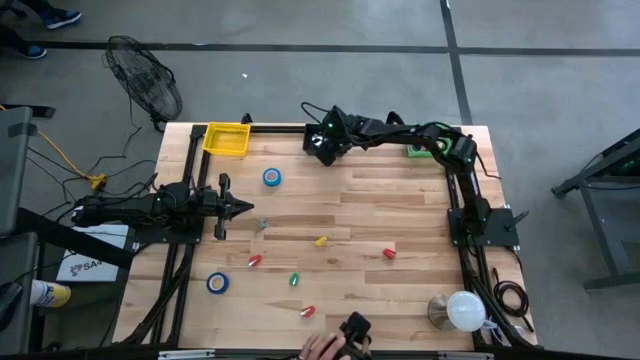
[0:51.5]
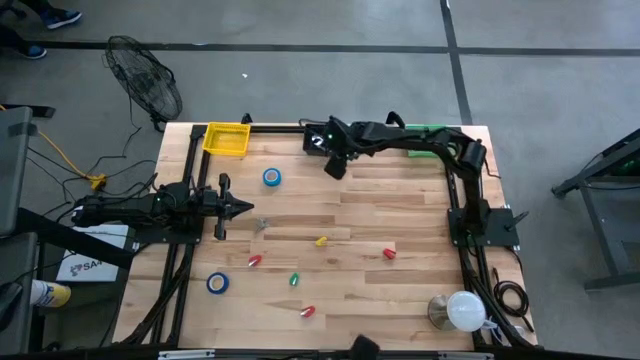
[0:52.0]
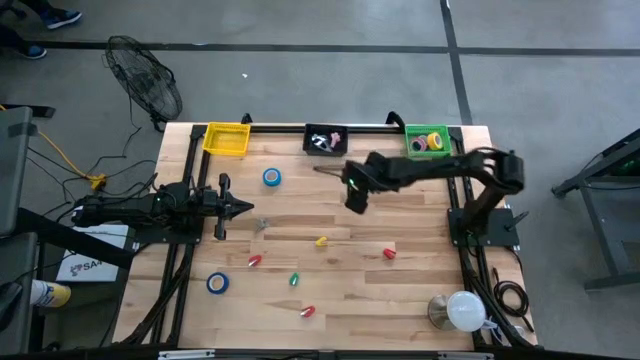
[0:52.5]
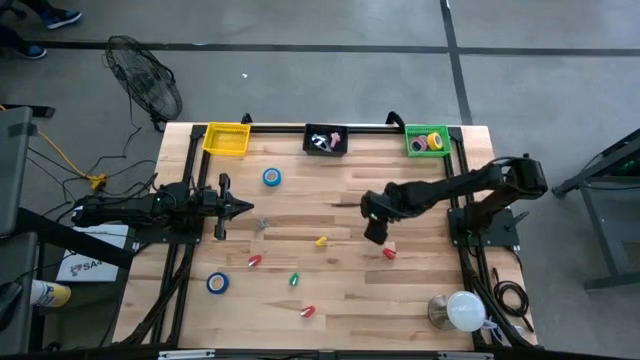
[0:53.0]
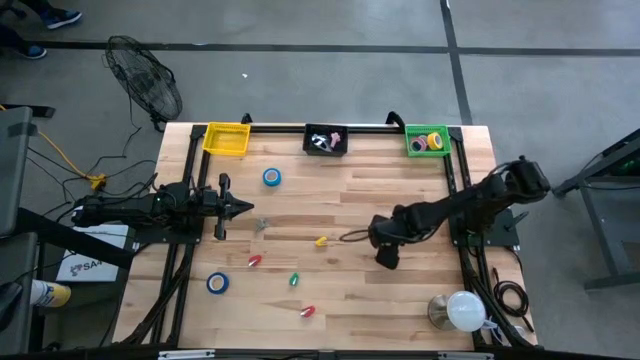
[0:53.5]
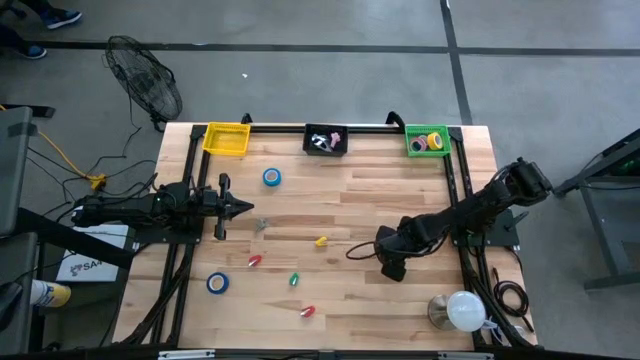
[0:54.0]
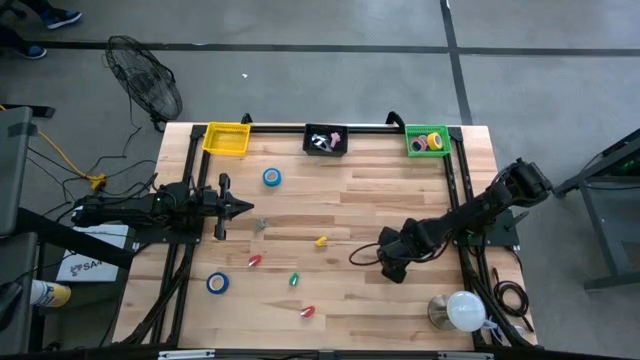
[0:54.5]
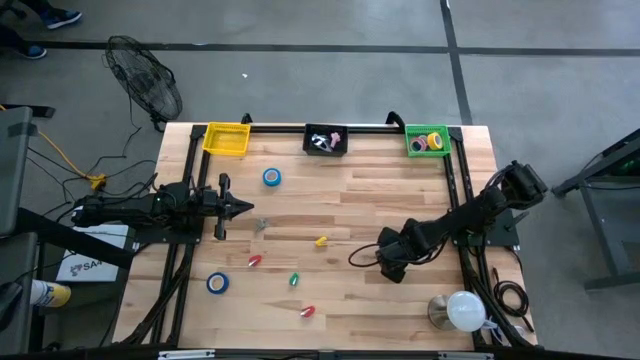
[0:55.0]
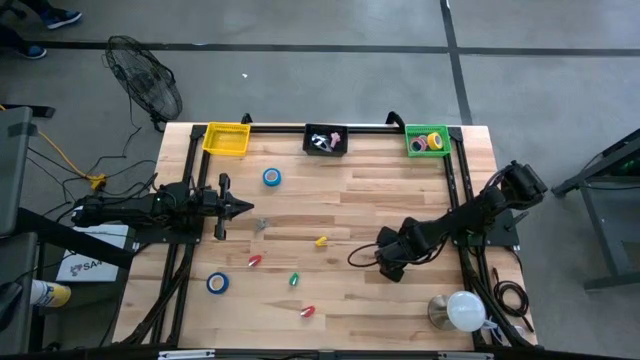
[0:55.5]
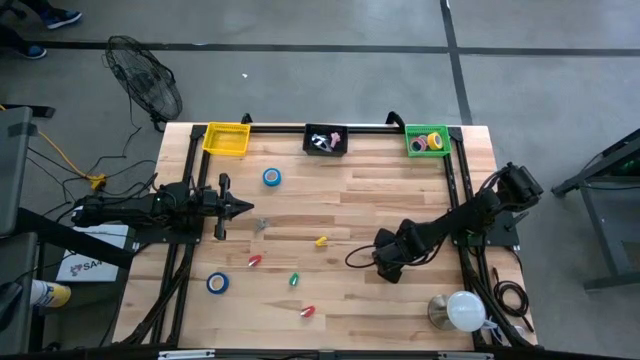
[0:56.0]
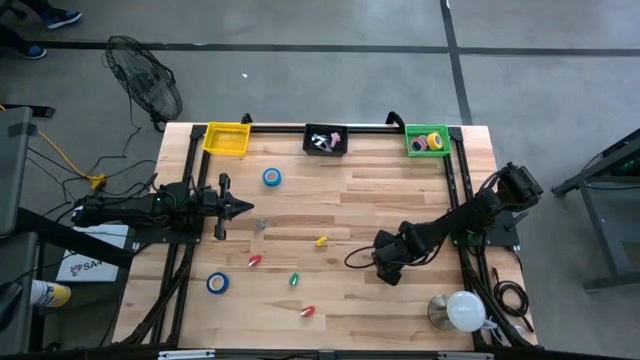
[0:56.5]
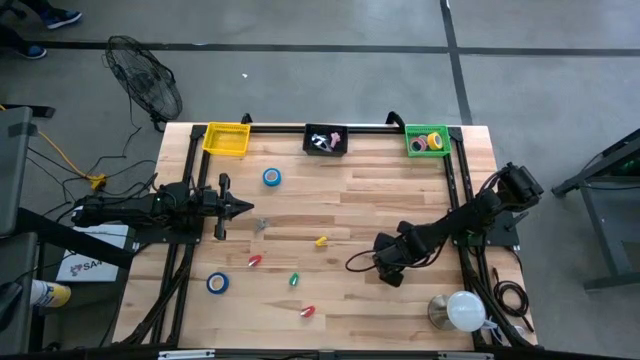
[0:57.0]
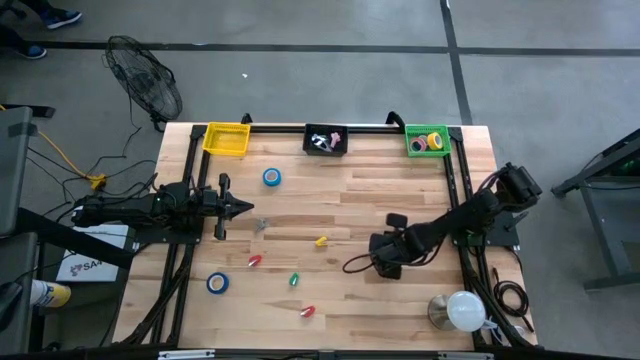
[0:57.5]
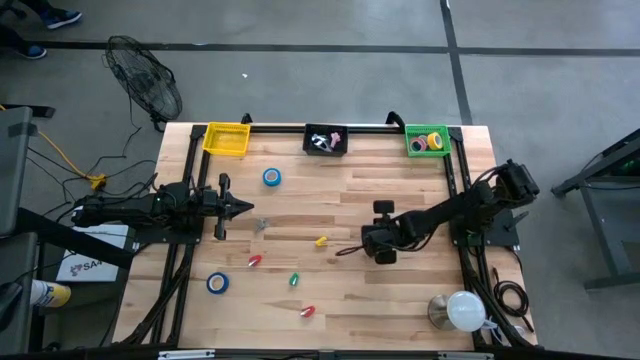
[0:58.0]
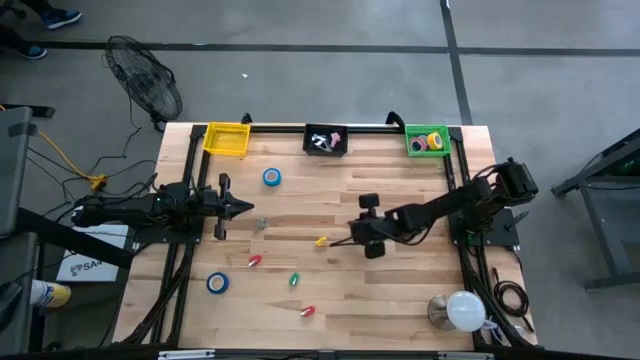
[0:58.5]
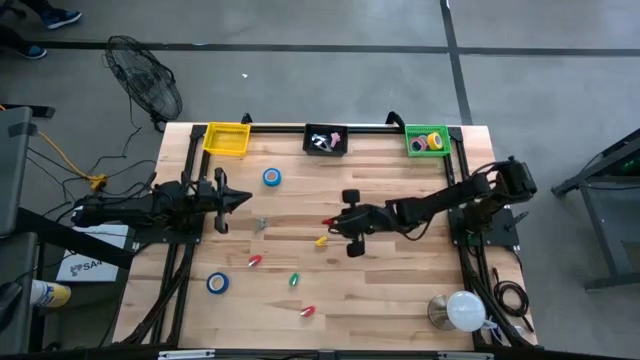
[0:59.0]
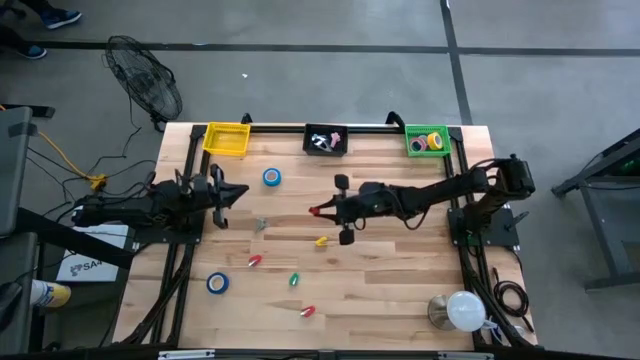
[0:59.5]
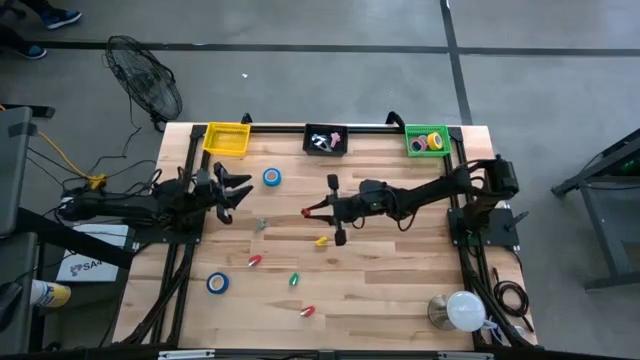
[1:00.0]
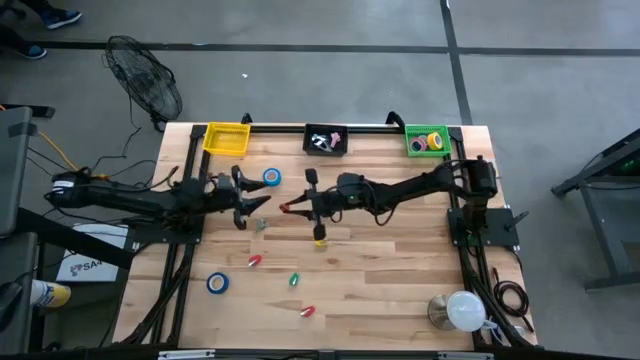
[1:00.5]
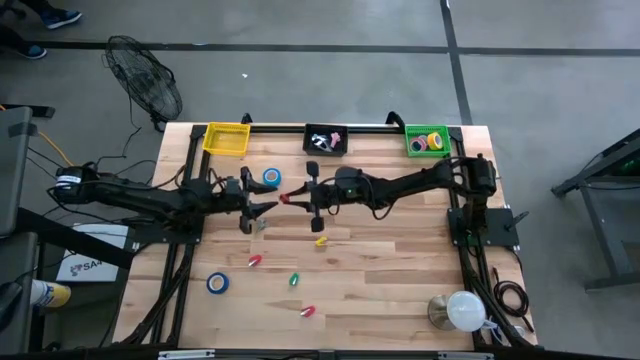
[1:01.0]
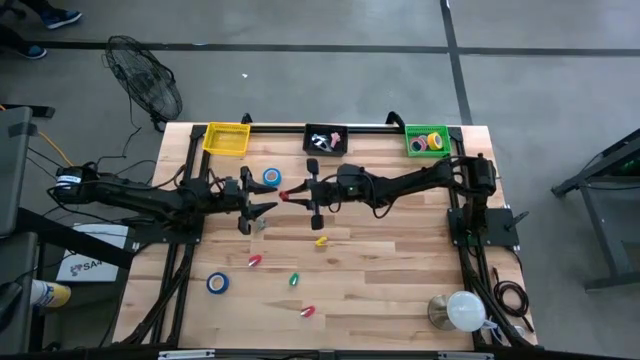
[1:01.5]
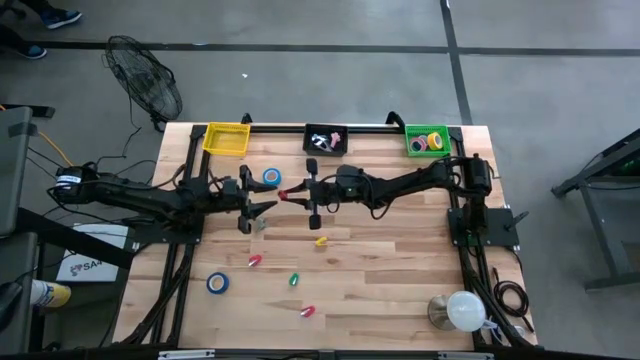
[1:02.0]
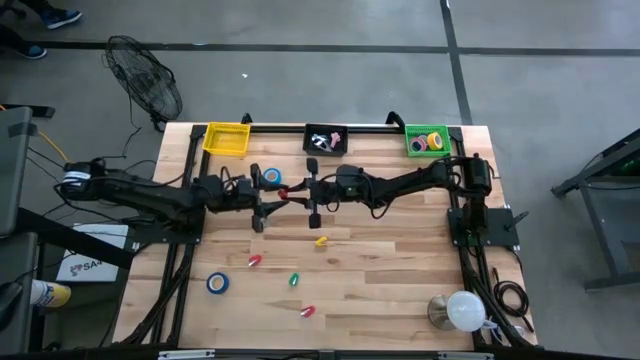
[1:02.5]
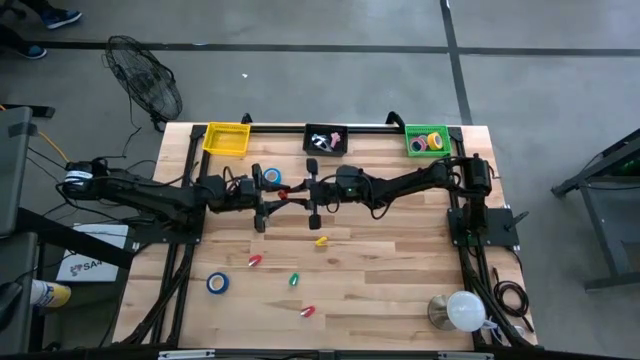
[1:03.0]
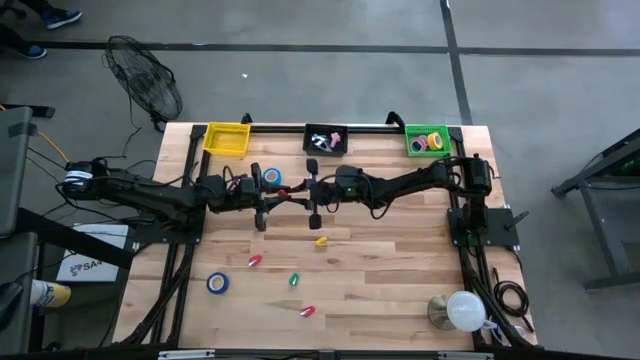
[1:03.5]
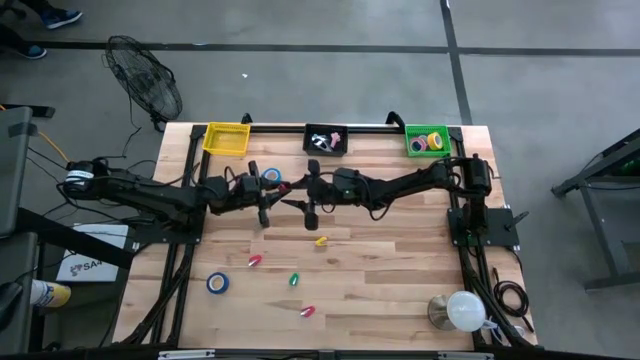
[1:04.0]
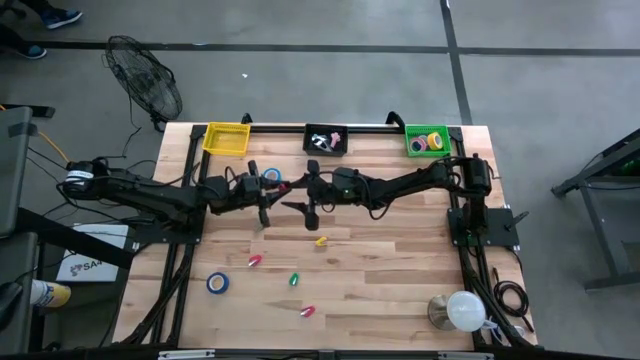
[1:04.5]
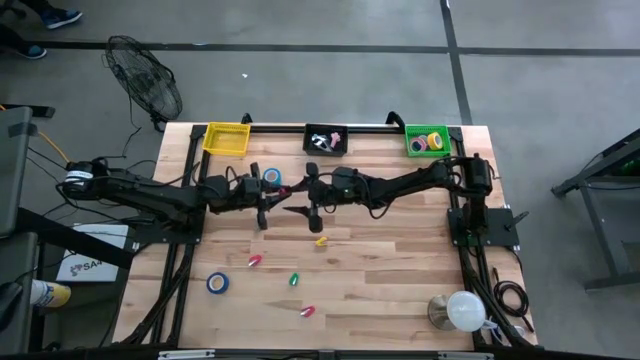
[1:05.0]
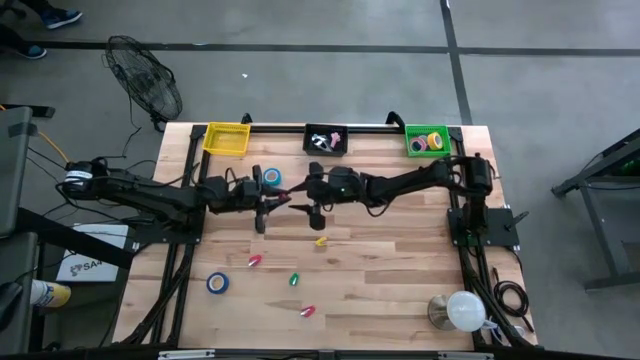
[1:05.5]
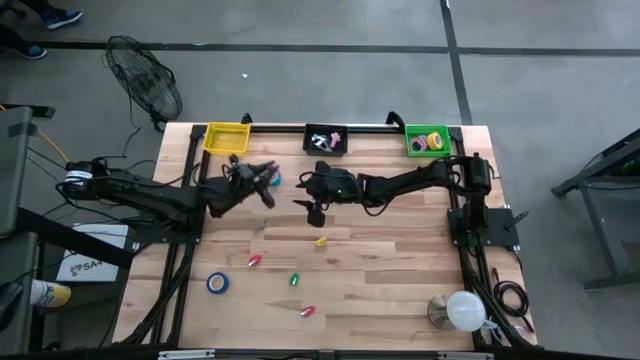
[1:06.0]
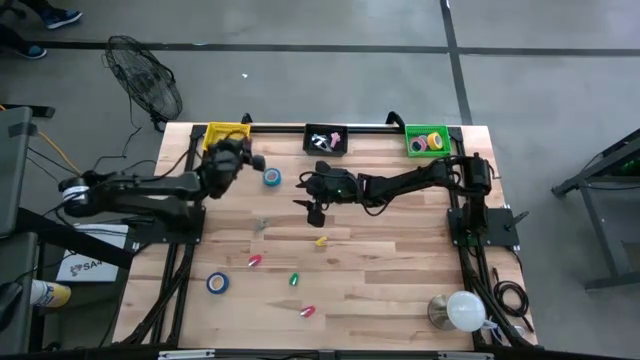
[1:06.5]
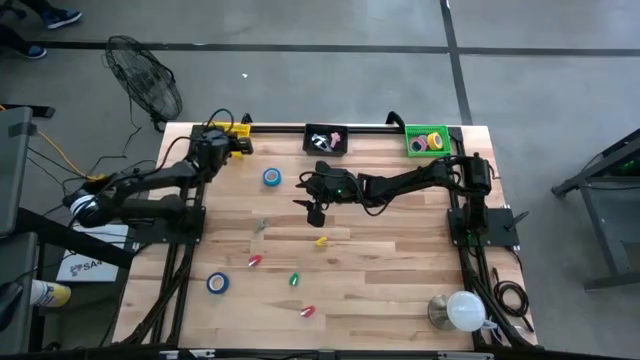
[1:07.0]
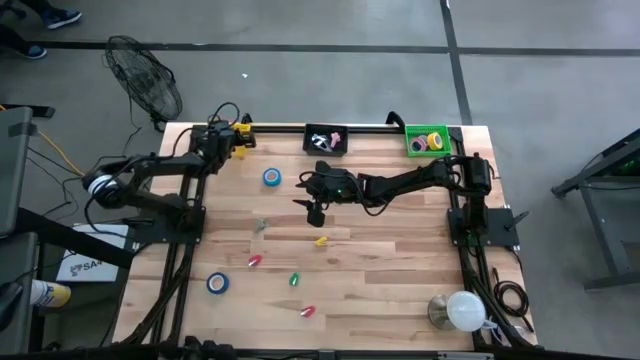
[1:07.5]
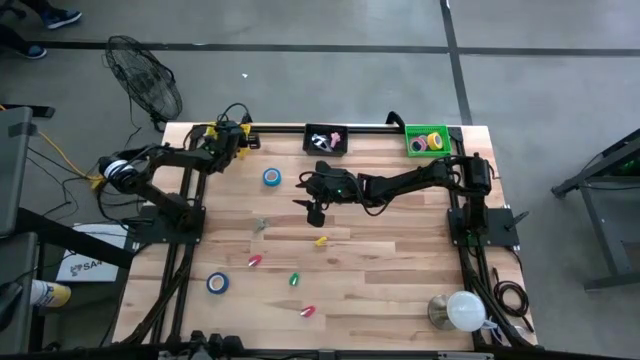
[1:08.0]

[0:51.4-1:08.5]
Task: Pick and place Stapler, Stapler remover, tape
Put the top right red stapler into the yellow bin

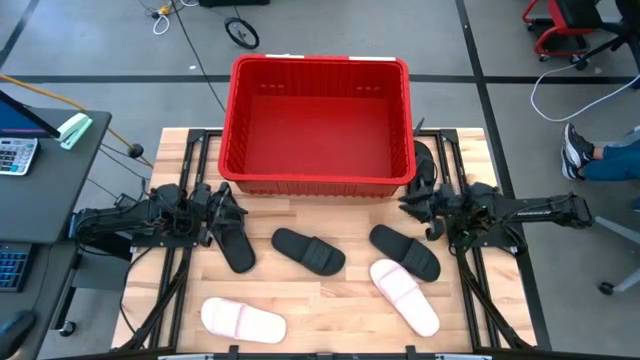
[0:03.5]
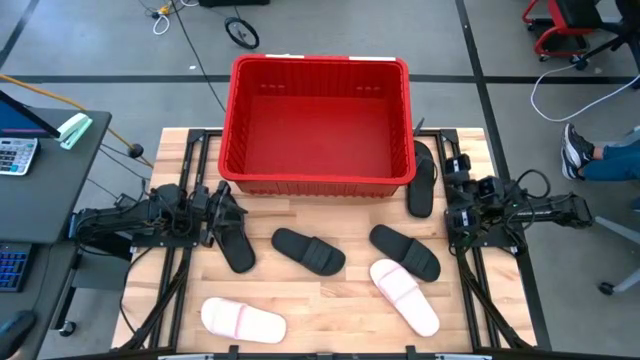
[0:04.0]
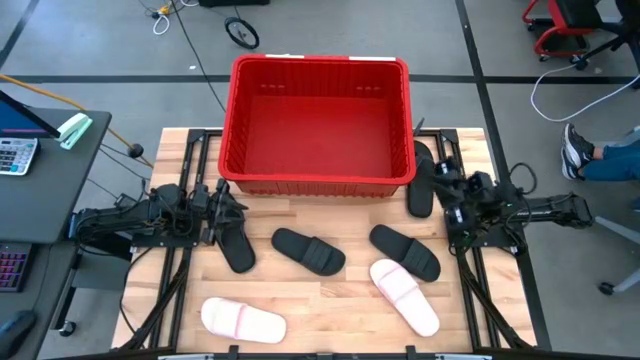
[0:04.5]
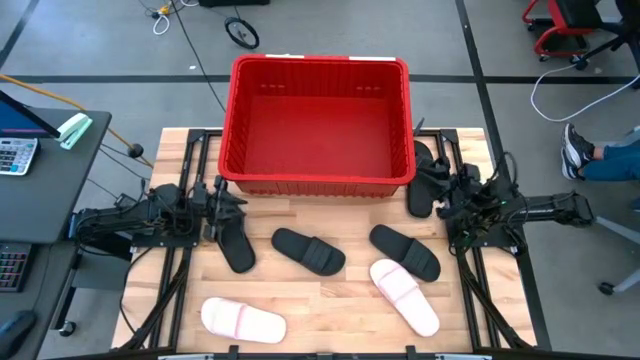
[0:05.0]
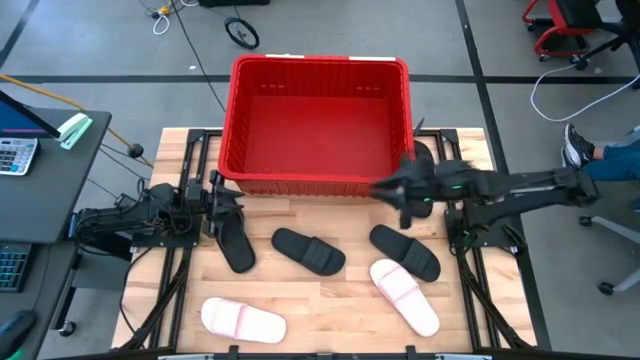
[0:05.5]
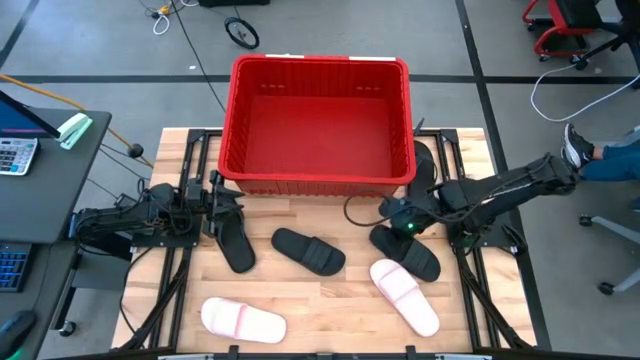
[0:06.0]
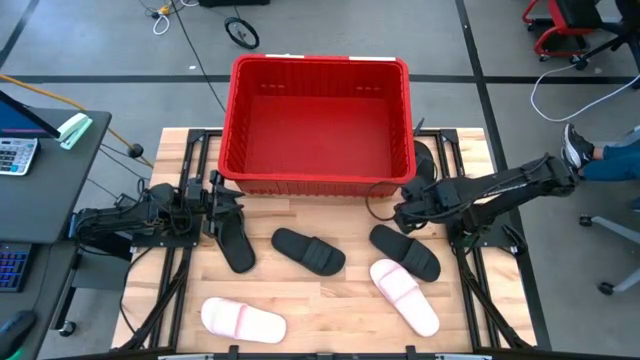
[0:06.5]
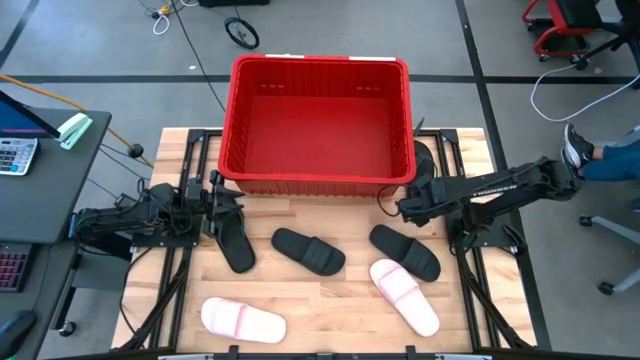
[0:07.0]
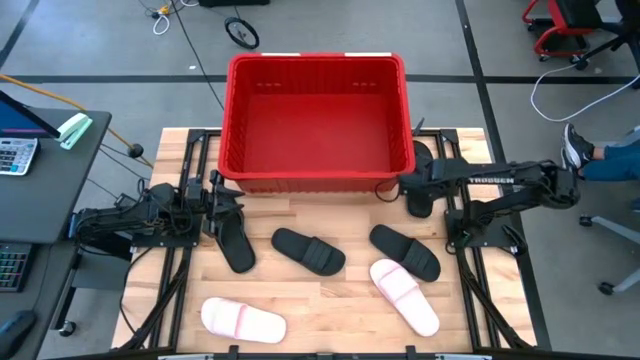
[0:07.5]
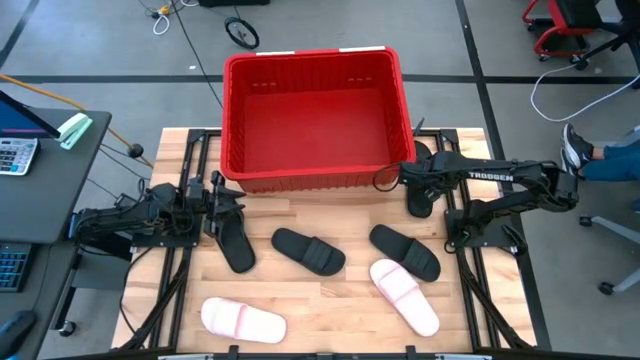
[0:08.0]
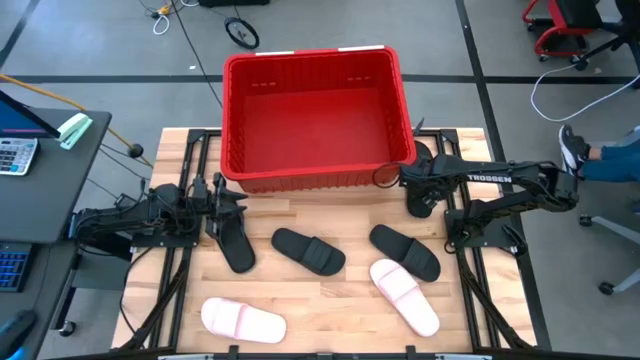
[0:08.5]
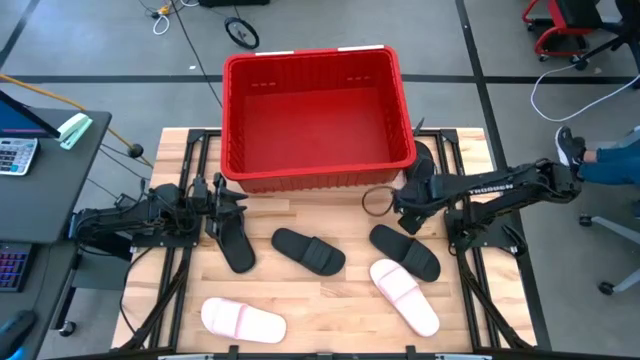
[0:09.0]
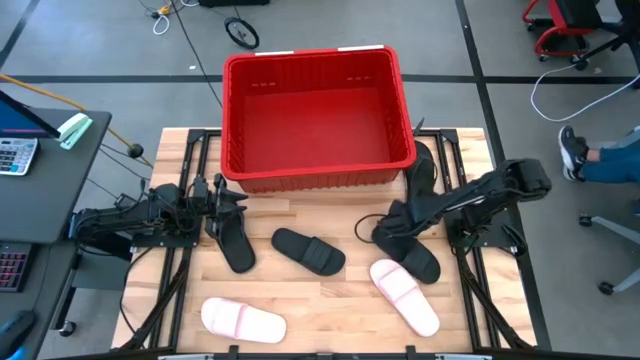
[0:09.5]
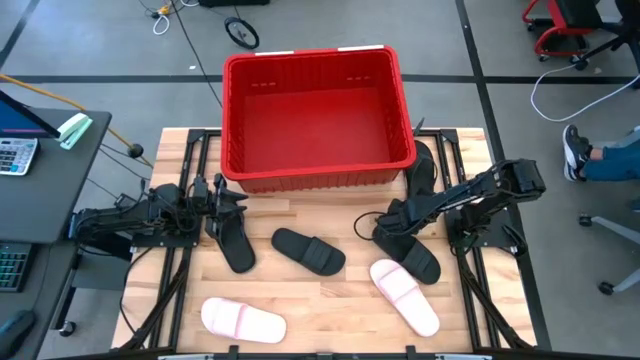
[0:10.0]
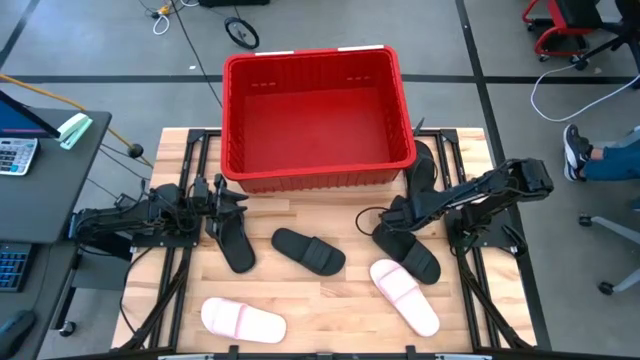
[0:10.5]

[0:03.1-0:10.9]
Task: Pick and place slides into bin
Put the right black slipper into the red container
